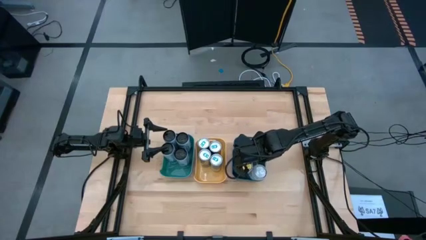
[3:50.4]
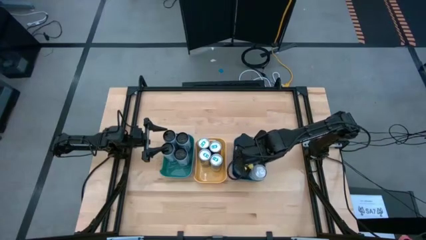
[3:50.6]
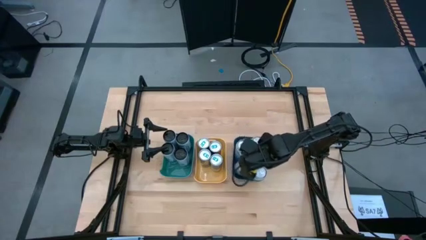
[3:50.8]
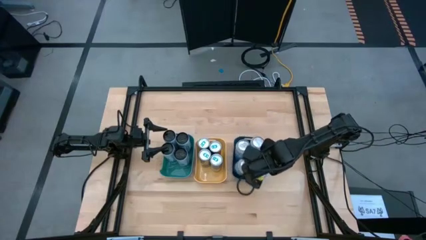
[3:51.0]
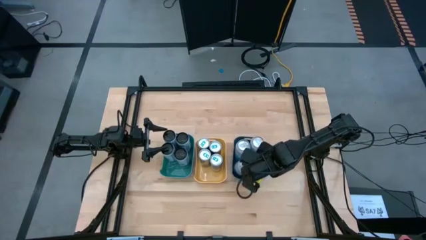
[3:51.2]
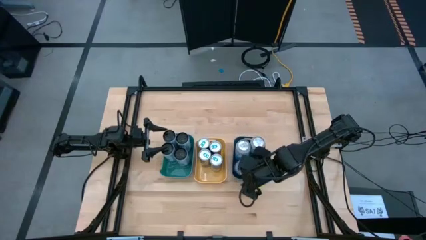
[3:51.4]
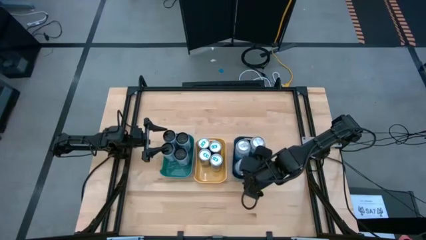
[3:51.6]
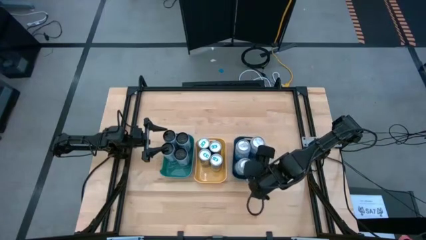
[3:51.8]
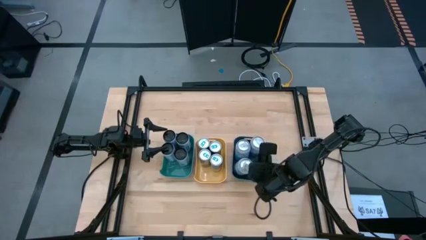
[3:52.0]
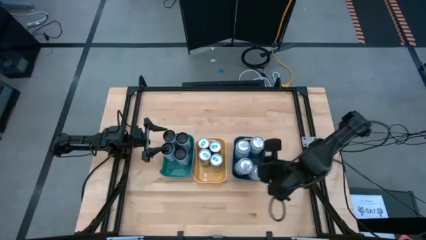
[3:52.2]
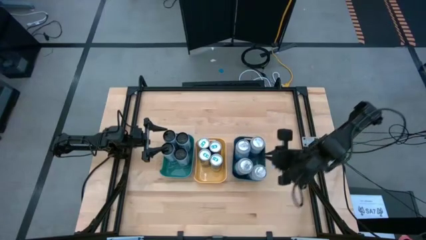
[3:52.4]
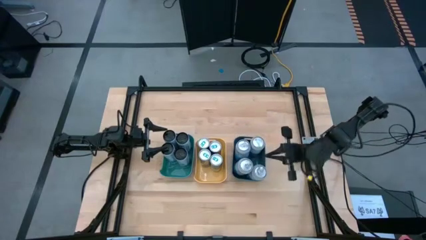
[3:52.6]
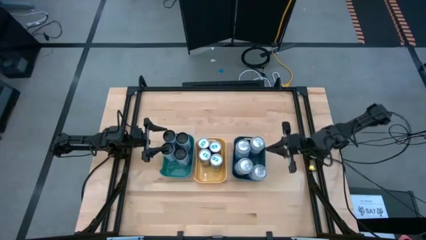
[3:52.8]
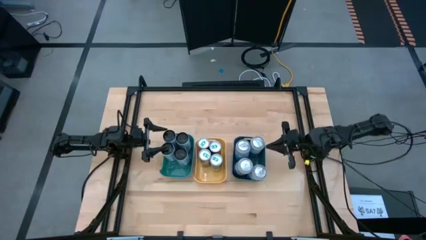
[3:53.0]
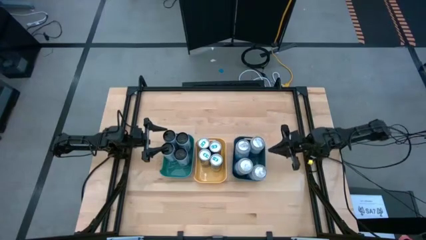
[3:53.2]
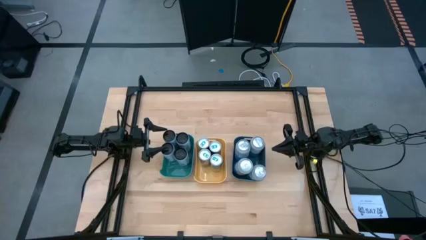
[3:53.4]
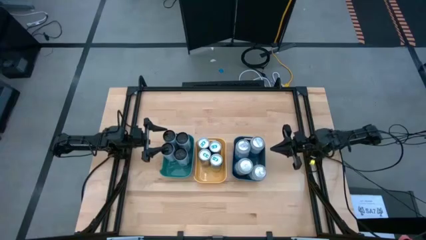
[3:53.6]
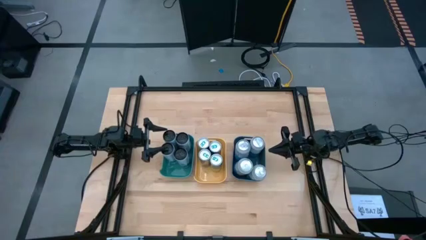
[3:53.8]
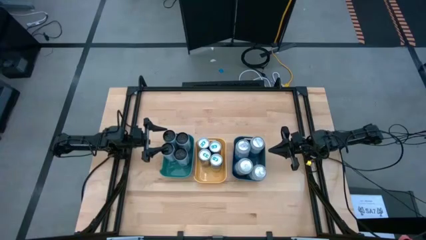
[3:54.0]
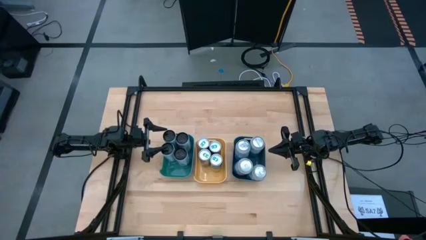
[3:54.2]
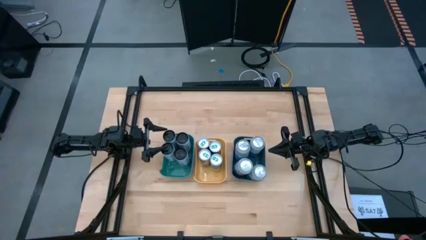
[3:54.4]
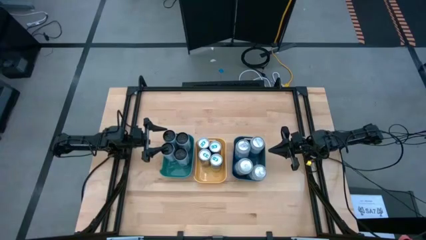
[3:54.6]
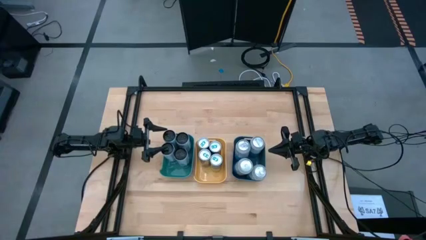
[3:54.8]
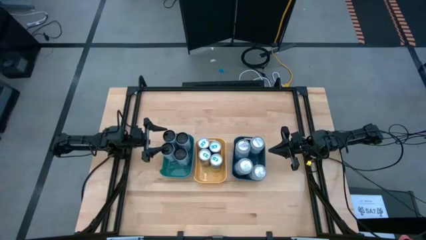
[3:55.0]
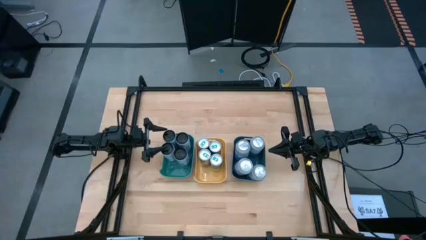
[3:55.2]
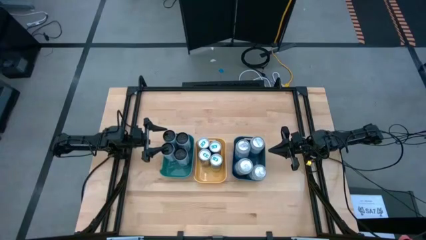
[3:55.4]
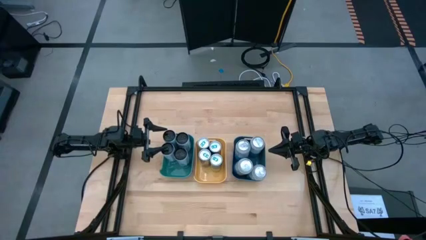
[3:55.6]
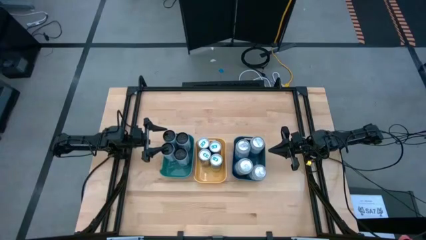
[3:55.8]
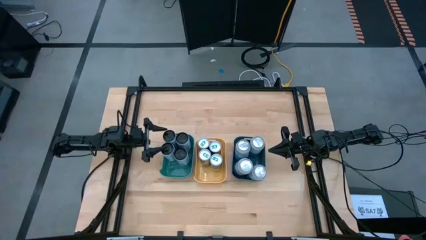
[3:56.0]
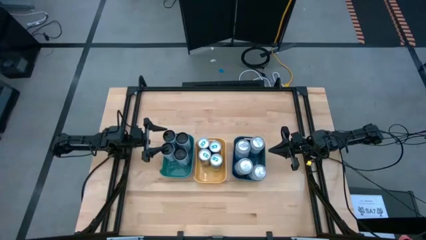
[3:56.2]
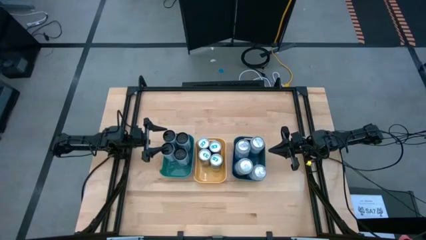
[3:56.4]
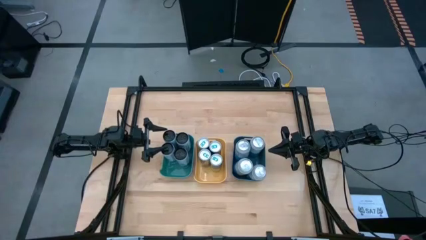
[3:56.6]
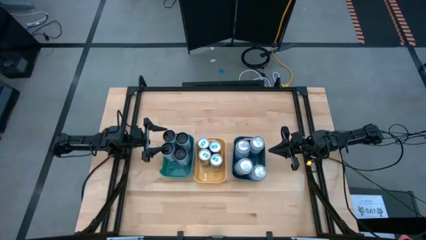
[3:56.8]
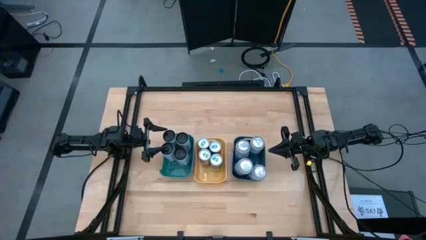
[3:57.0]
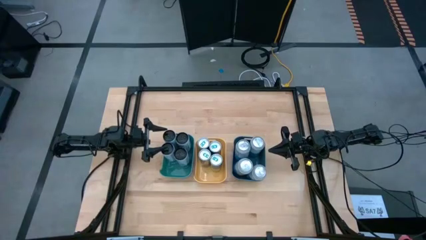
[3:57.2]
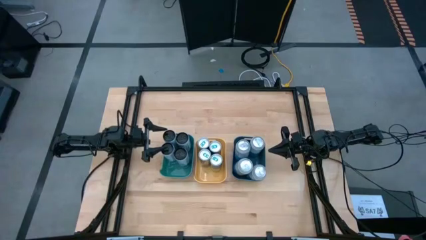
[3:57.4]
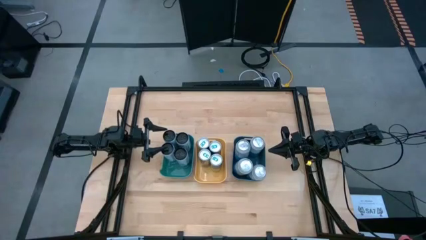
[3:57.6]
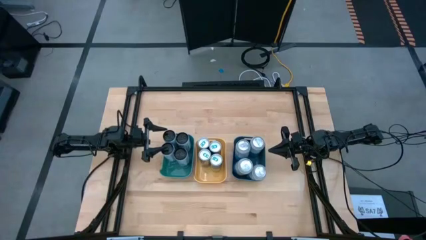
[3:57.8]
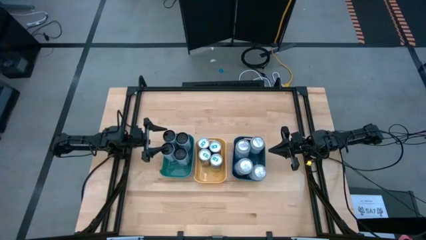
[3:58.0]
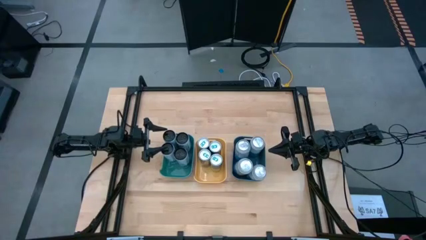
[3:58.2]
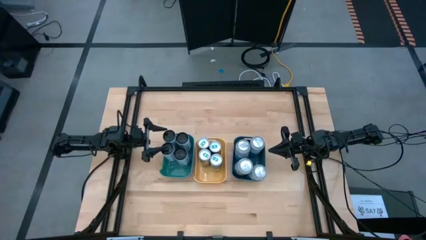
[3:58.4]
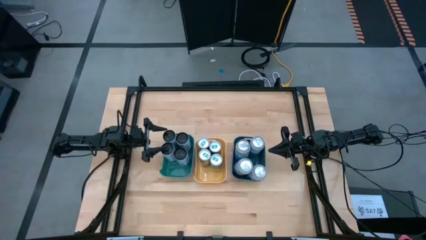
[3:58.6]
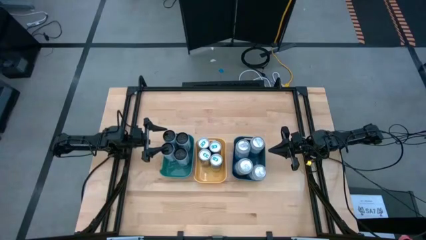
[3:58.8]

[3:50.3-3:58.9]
Task: Sort soda cans
Return to Home Position

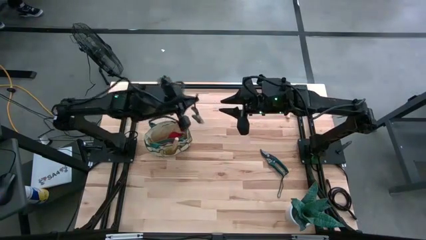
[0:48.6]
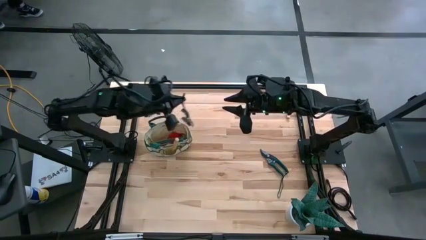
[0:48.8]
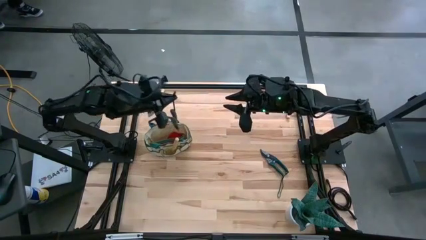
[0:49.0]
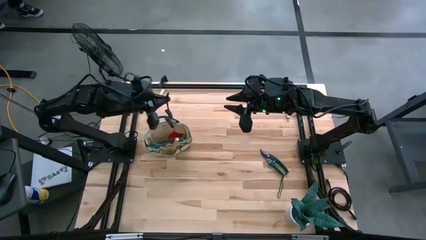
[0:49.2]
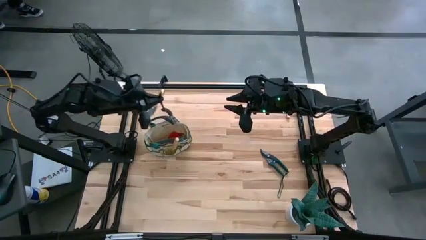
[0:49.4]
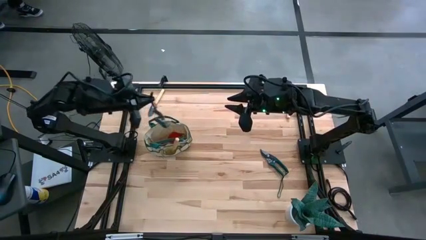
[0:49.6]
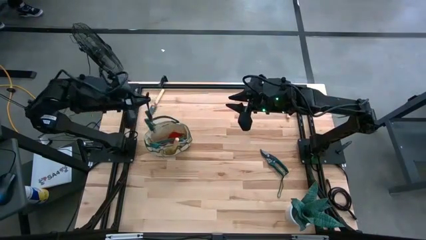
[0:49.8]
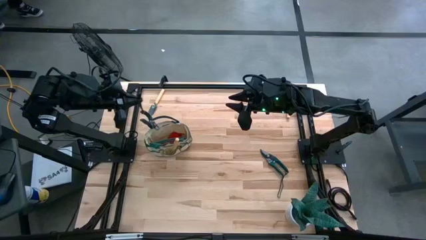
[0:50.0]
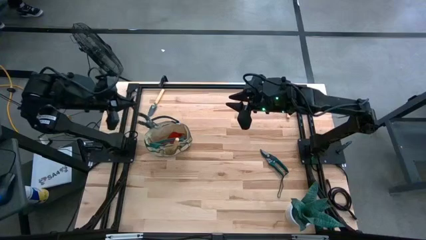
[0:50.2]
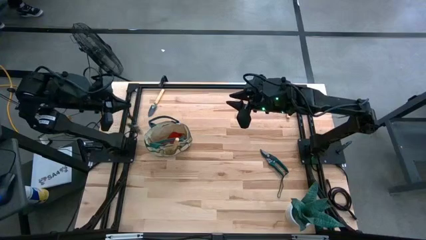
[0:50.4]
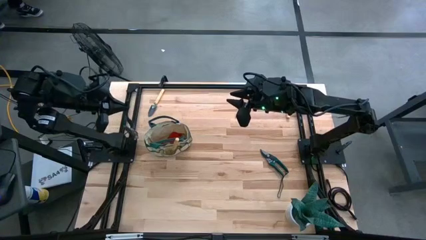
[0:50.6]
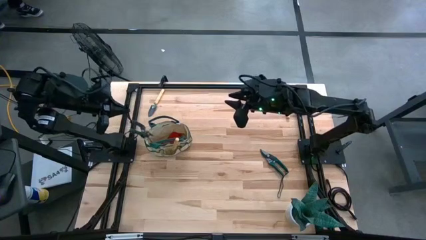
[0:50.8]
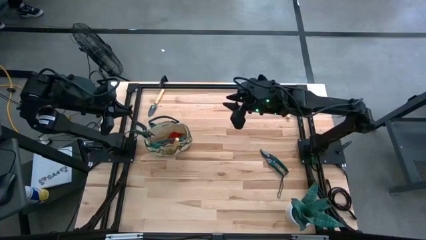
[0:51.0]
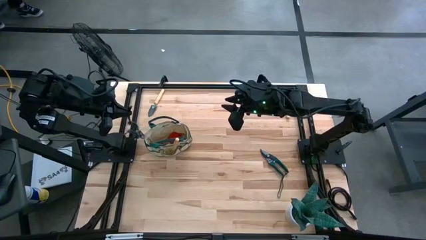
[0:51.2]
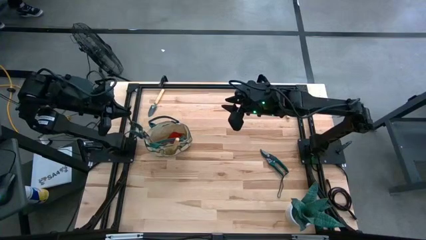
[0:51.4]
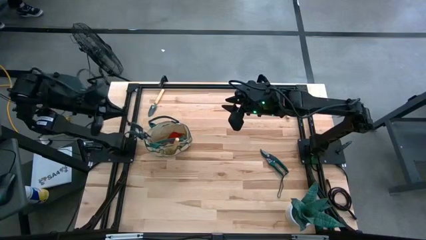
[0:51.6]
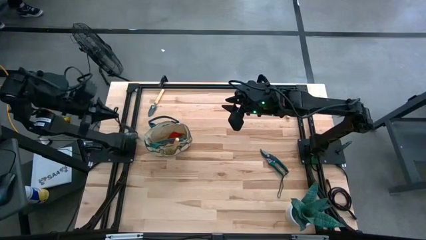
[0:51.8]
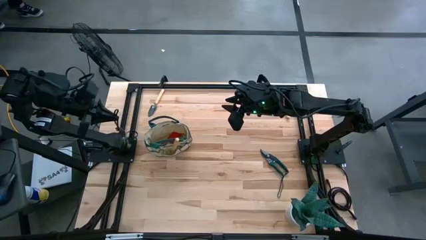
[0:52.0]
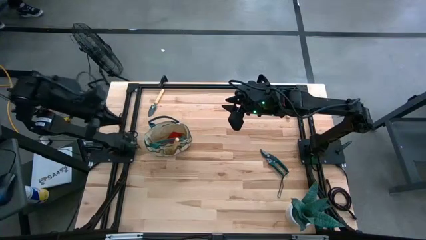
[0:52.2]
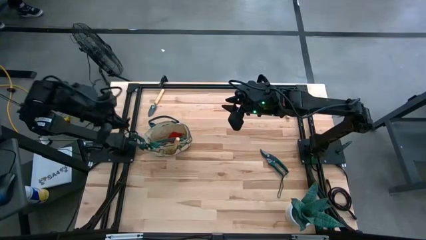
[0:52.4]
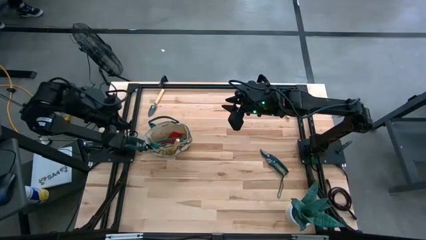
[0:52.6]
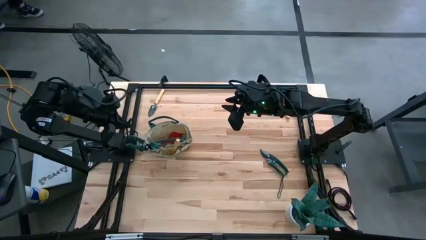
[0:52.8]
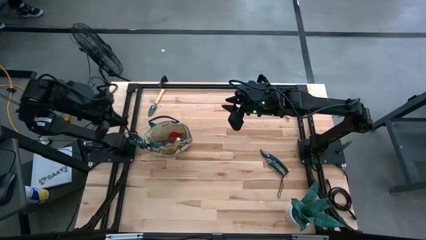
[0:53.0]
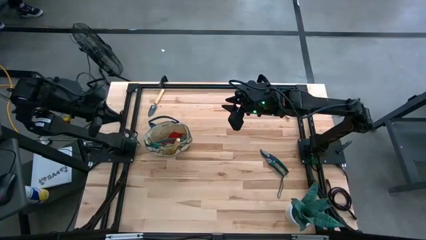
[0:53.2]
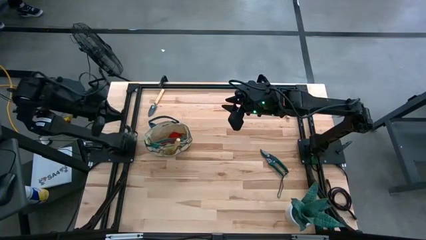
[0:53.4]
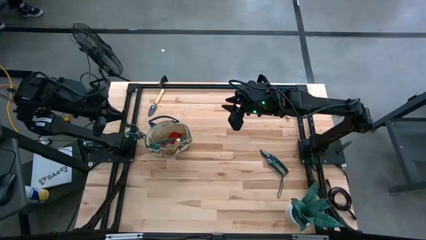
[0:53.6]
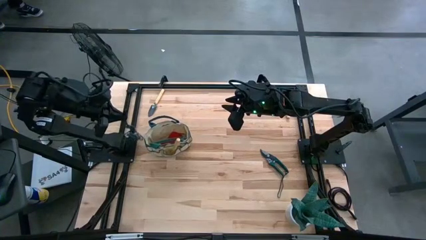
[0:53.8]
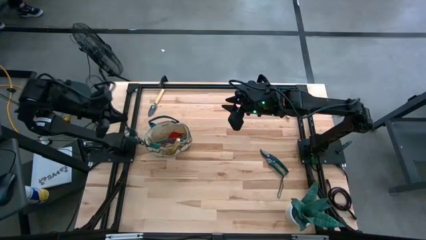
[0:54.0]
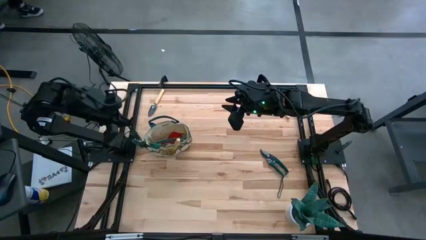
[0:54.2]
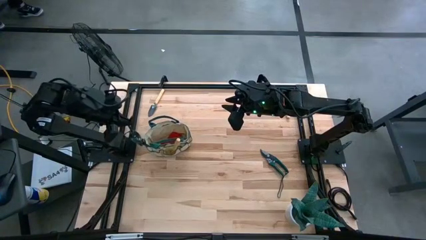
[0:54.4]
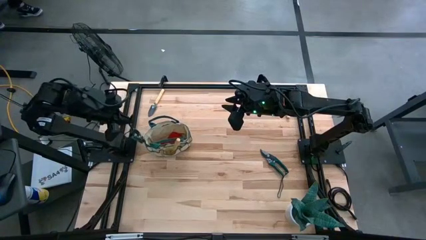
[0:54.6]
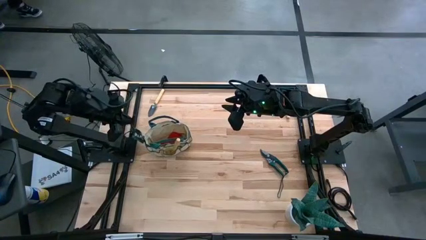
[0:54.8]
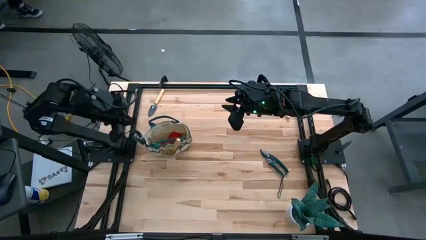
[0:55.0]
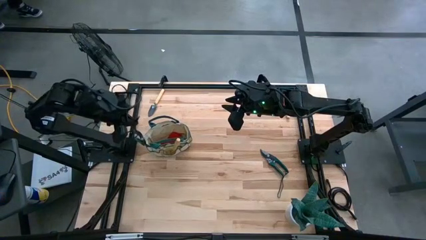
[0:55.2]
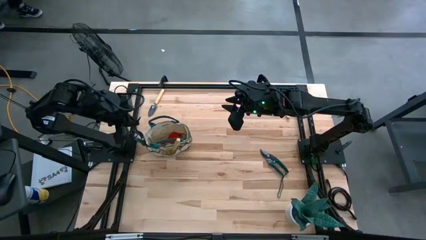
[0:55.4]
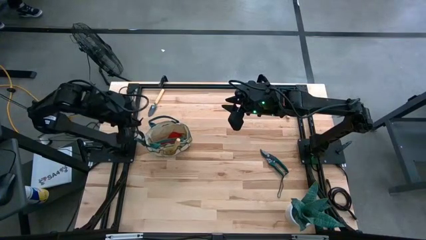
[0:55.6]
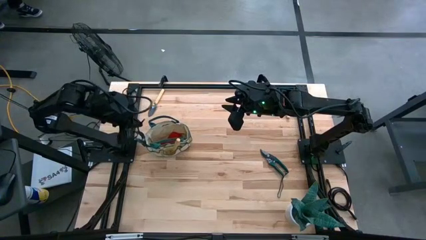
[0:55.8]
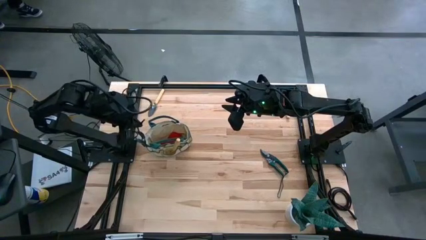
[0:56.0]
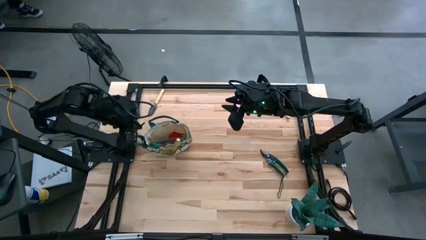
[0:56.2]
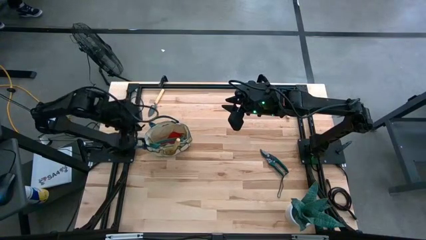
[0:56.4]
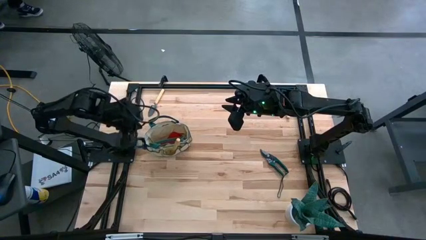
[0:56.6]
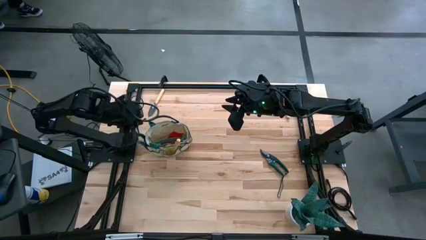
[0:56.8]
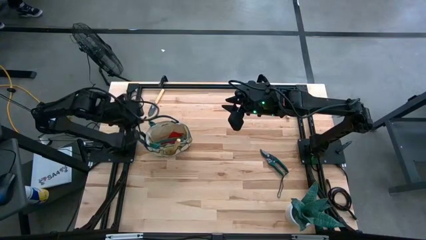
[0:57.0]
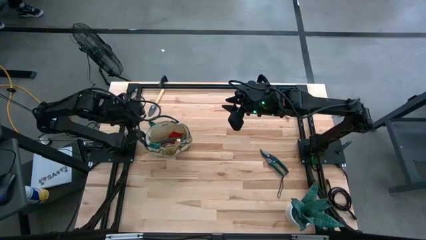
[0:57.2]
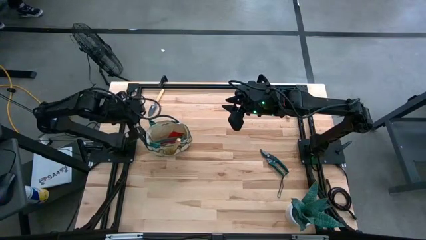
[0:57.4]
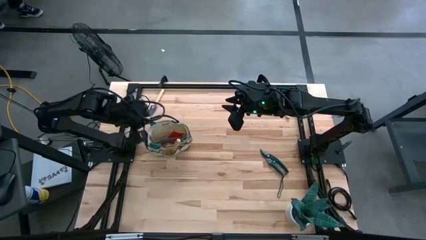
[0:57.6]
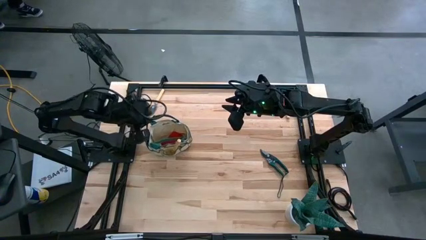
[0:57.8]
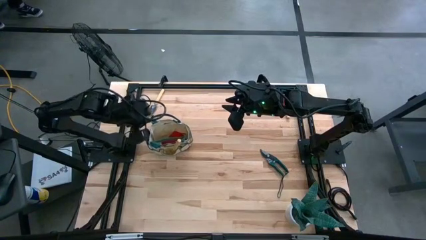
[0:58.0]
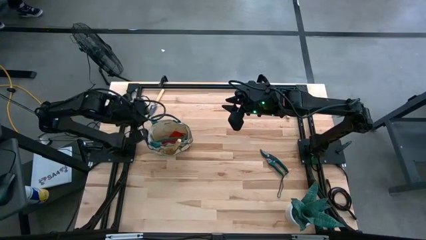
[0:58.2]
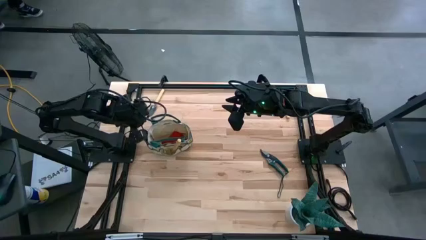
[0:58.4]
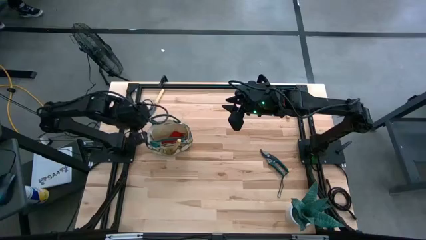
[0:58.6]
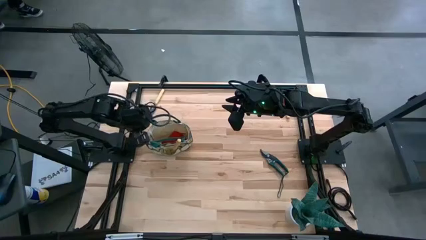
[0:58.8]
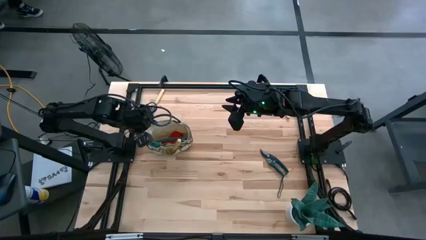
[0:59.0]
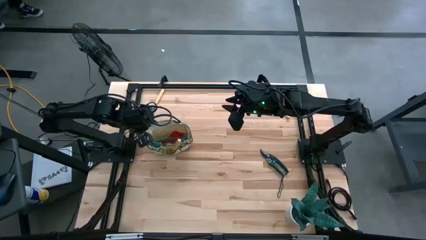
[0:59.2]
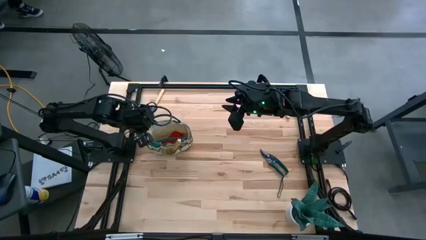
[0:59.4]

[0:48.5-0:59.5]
Task: Pick & Place Garden tools in Gardening bag
Put the left green shear scissors into the white gardening bag
